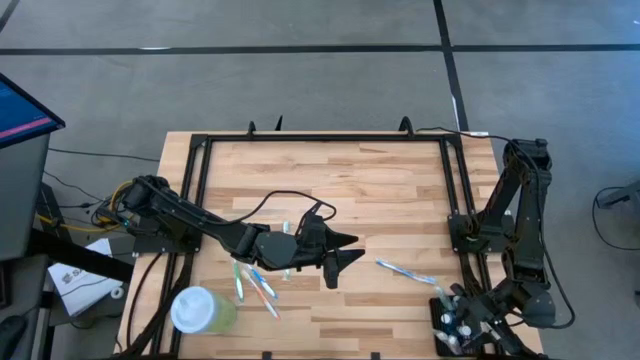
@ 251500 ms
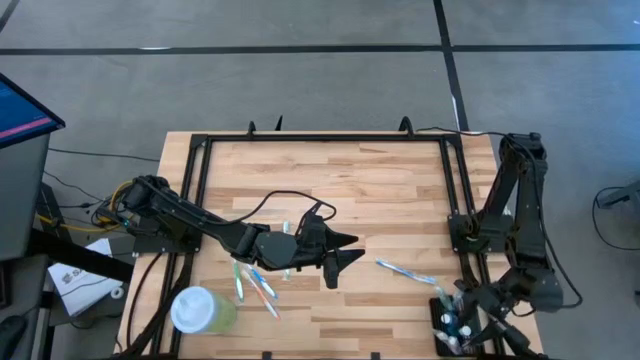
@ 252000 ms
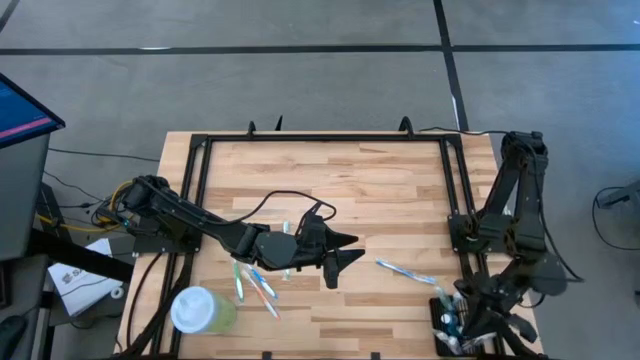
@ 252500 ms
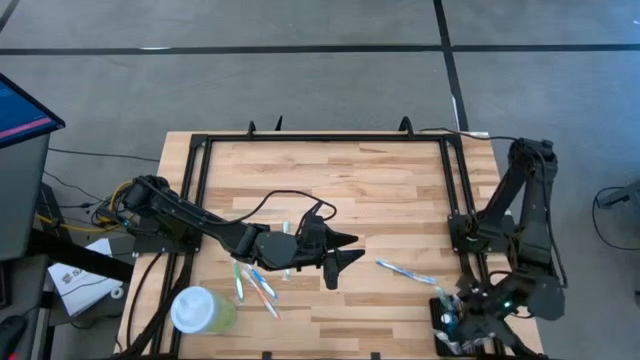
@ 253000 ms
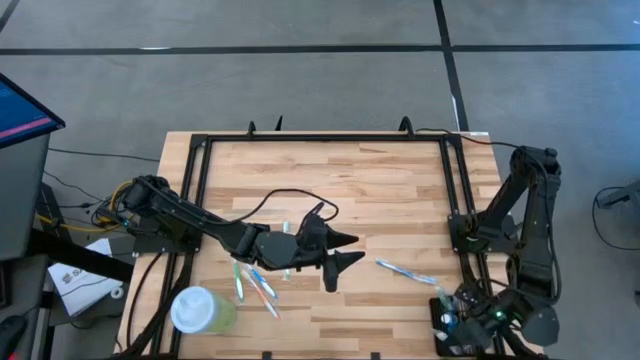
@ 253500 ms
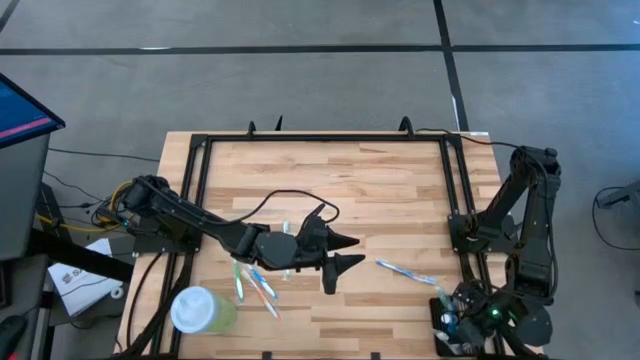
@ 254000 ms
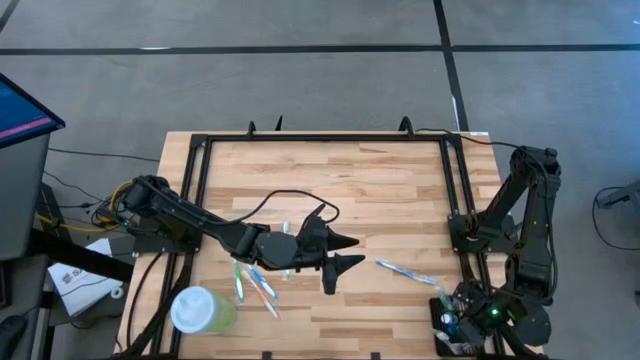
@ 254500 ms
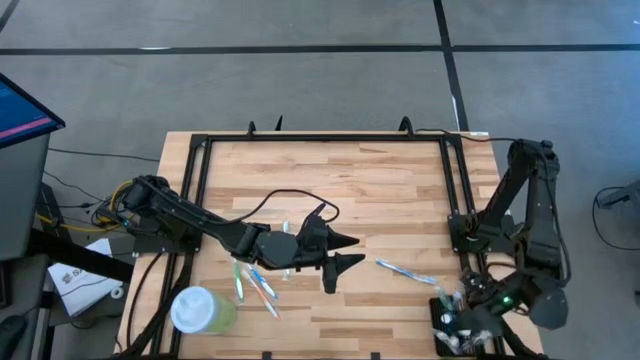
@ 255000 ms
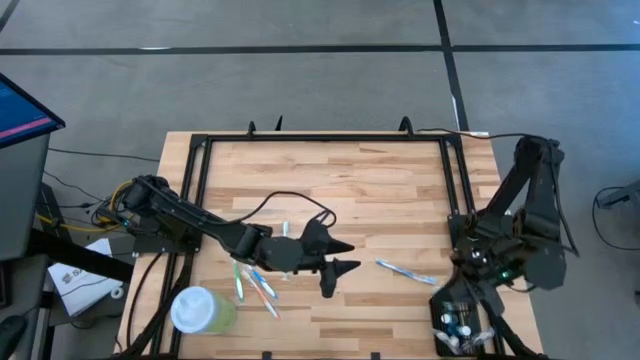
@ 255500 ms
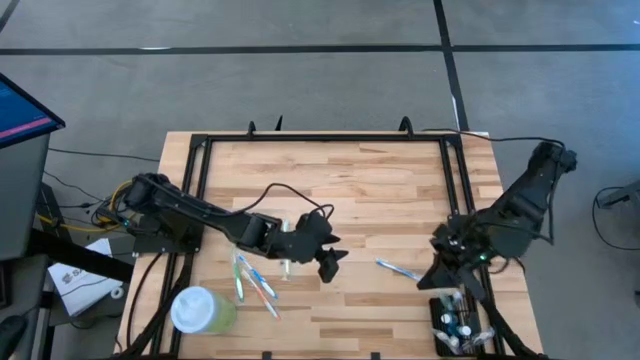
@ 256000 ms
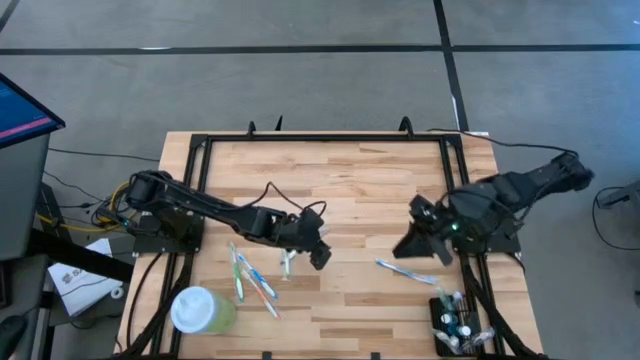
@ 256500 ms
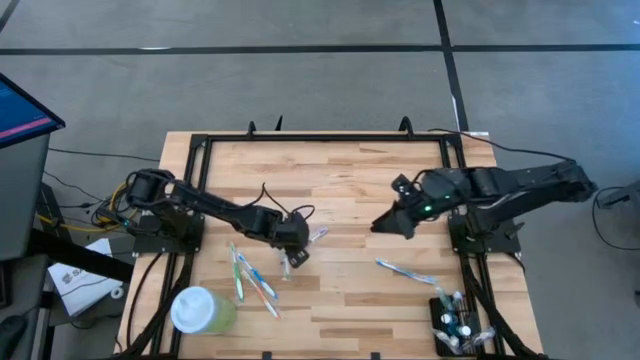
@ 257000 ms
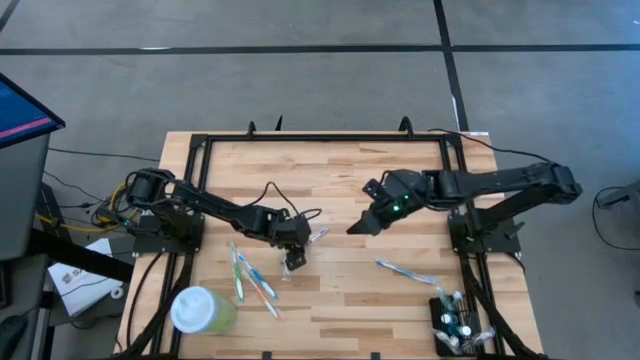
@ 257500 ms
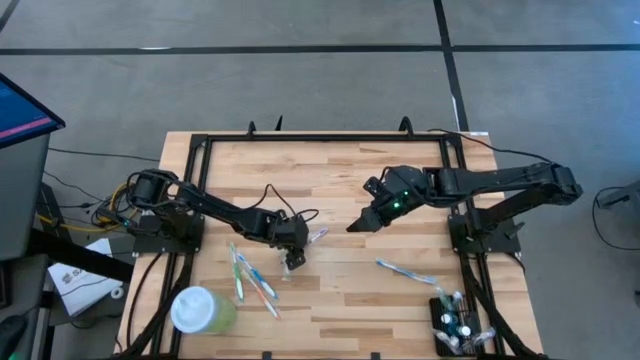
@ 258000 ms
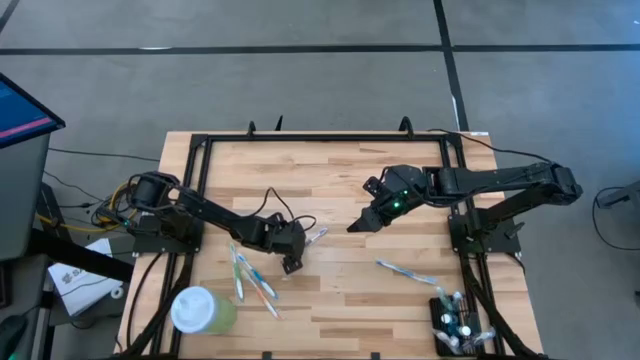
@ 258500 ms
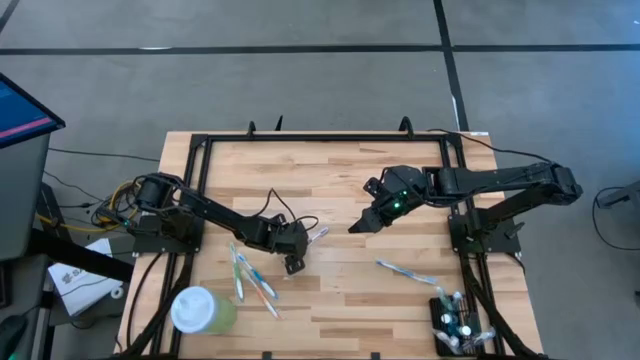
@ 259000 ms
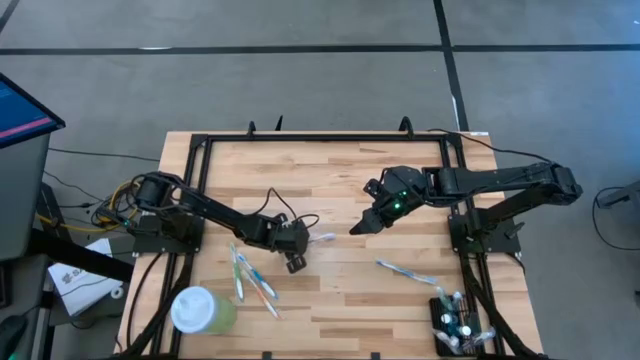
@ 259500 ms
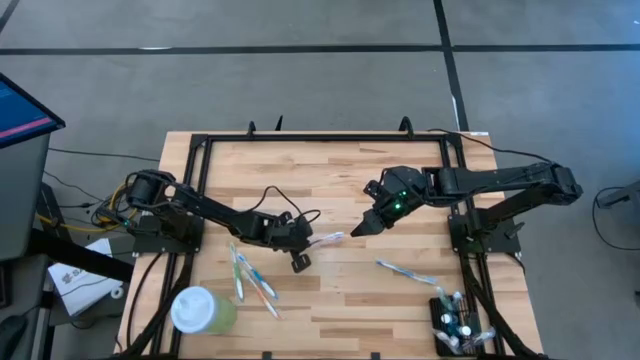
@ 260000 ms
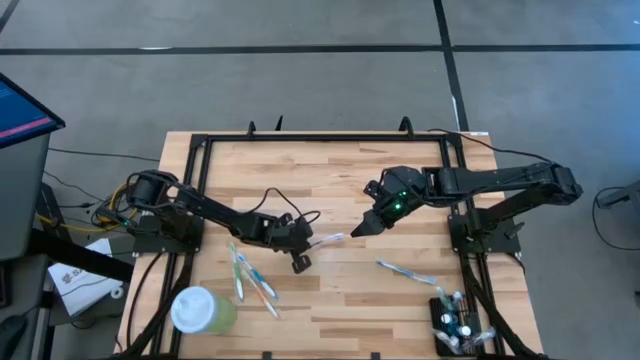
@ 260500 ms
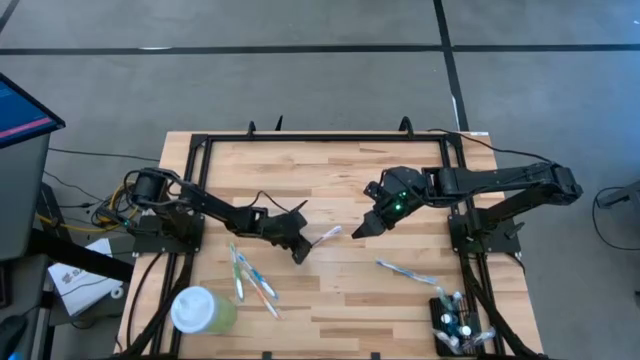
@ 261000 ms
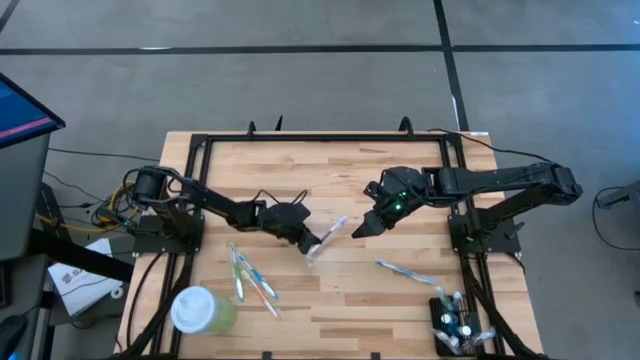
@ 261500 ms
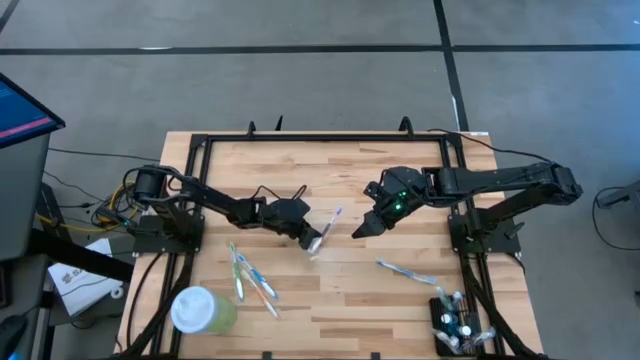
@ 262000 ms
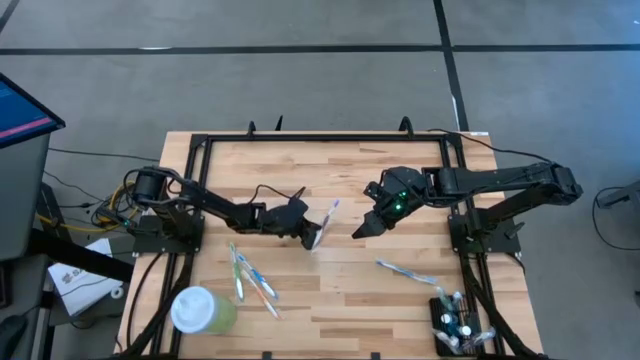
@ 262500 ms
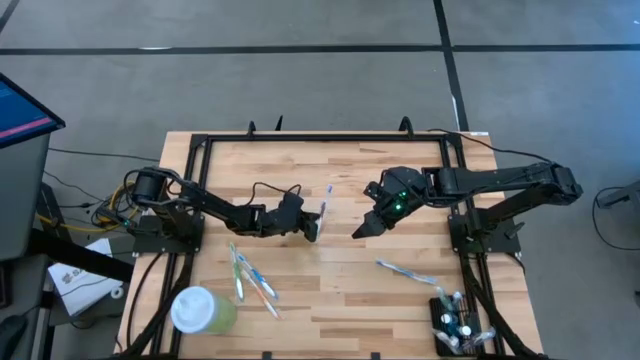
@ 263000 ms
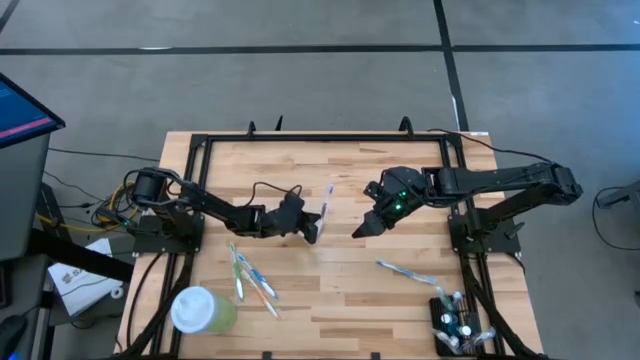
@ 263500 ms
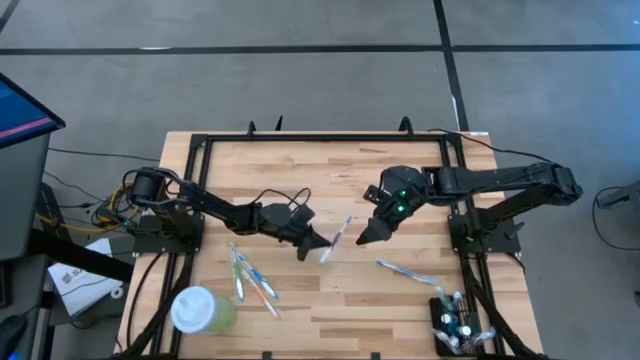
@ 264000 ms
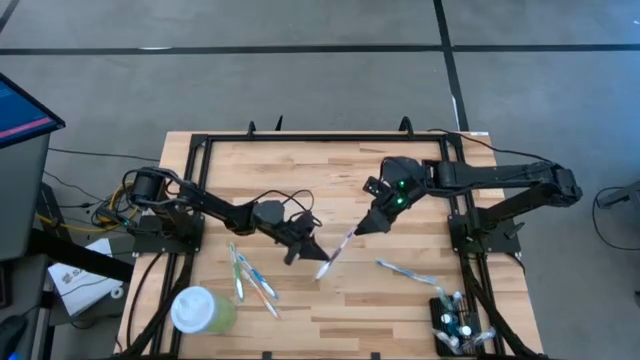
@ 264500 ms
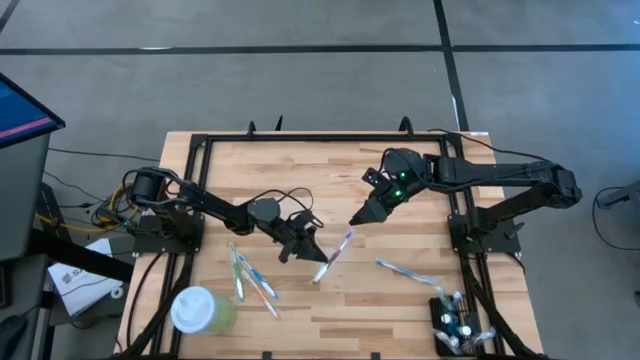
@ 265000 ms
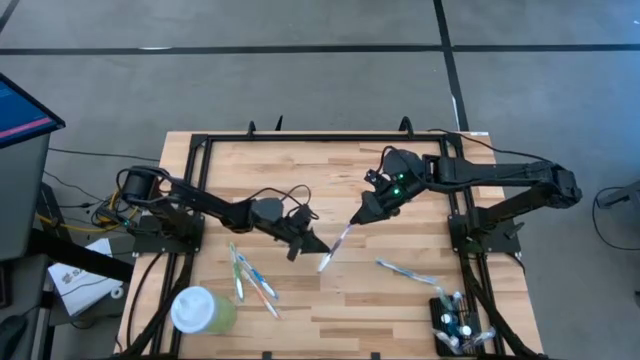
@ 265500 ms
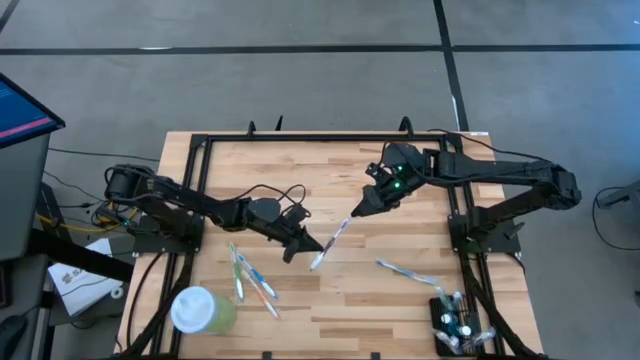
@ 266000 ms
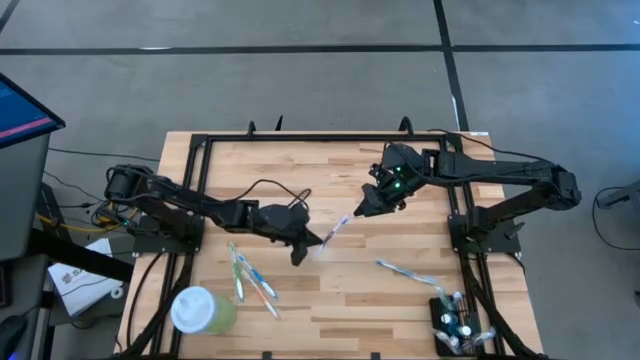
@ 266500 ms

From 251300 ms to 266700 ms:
Task: Pick & Place toothbrushing station
Put the purple toothbrush into the black organizer

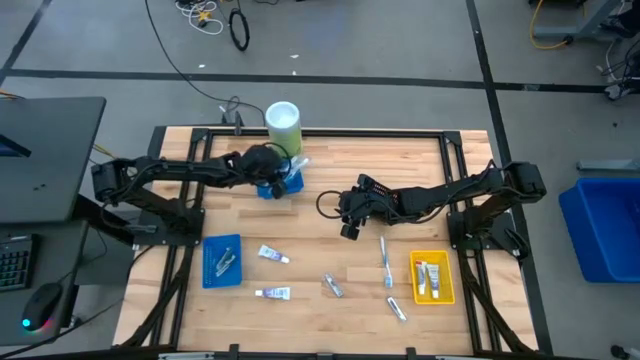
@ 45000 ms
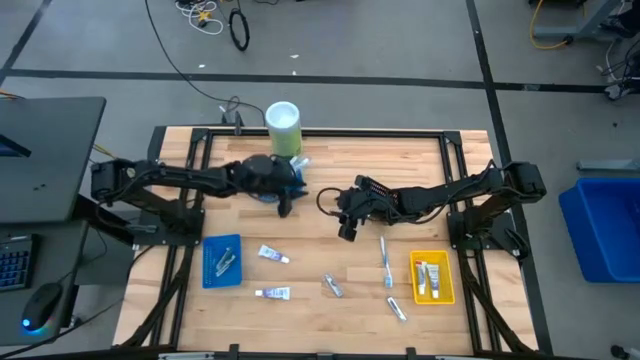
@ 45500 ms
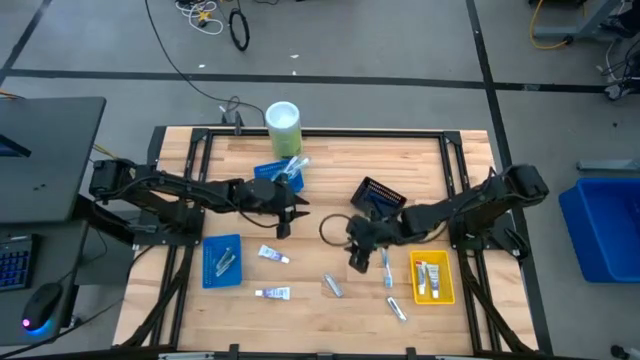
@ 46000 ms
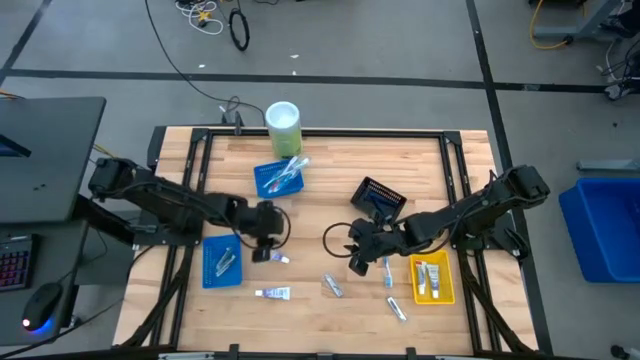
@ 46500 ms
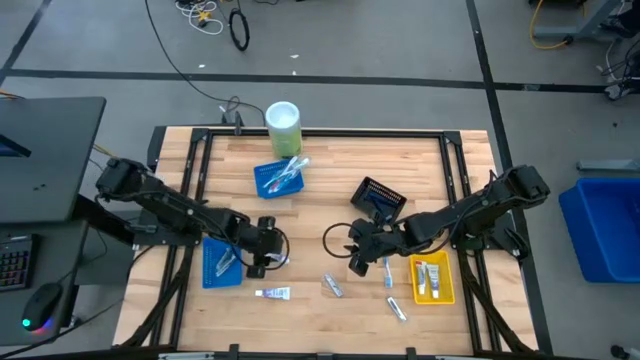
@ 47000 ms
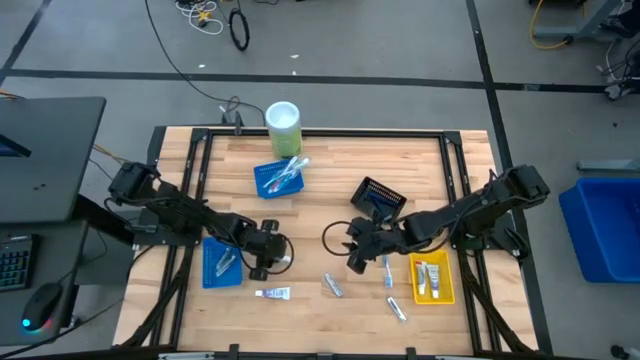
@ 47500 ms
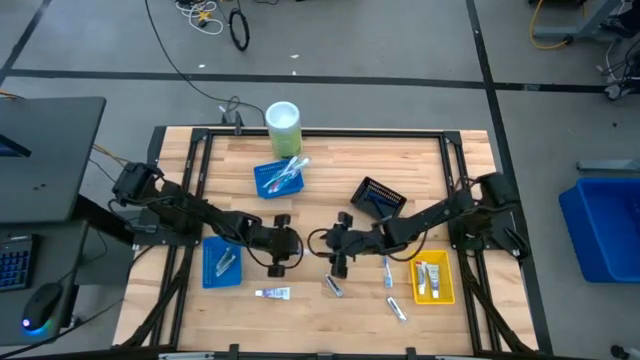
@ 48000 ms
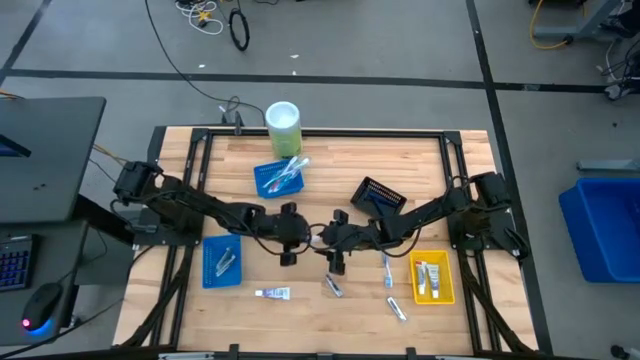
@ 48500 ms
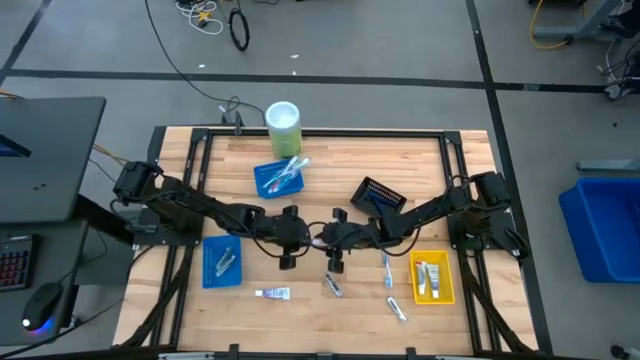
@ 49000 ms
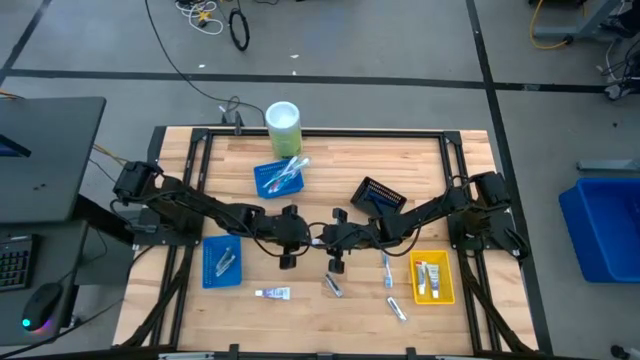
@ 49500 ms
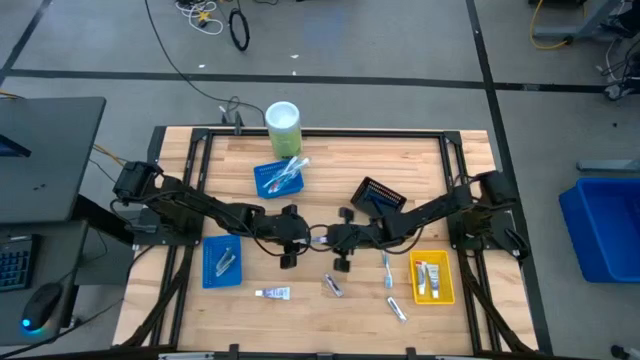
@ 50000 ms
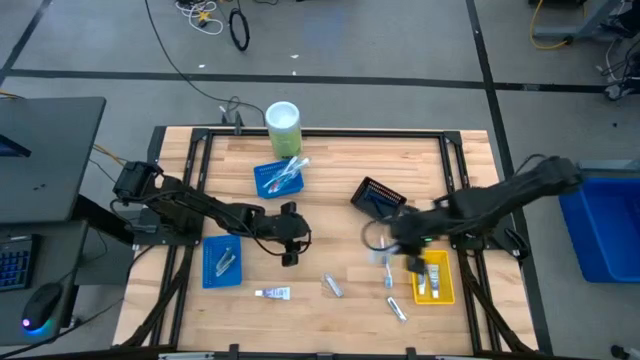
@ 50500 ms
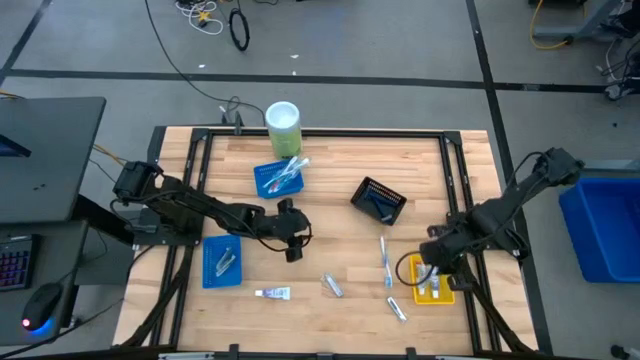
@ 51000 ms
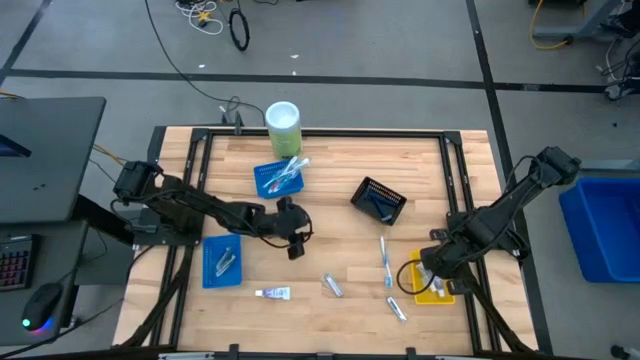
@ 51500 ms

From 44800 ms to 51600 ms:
Task: Pick & Place Travel size toiletries
Put the white toothpaste into the yellow bin
